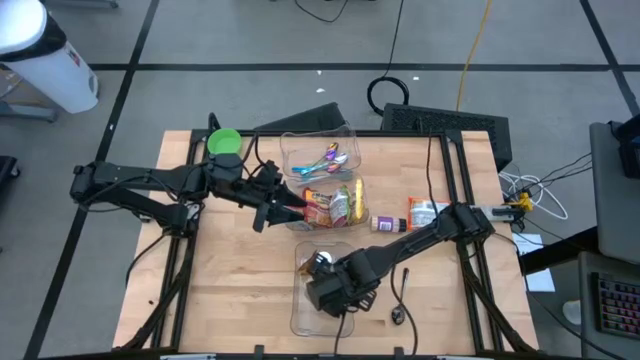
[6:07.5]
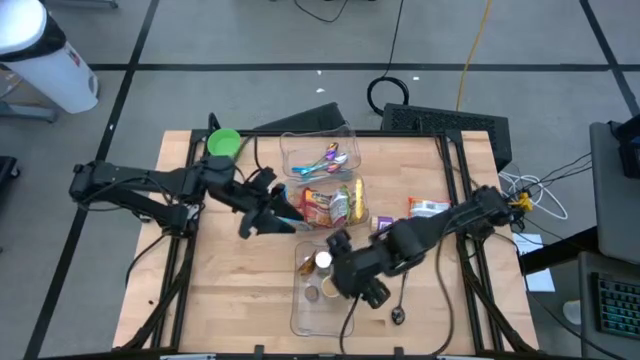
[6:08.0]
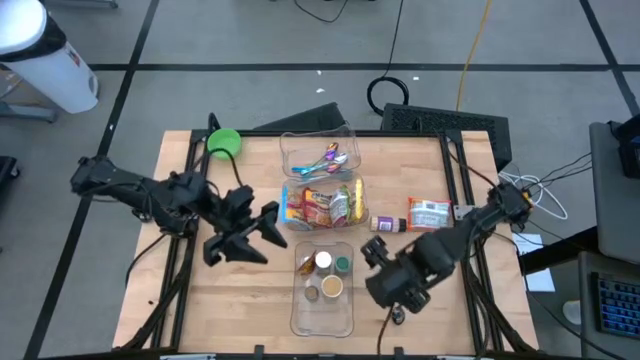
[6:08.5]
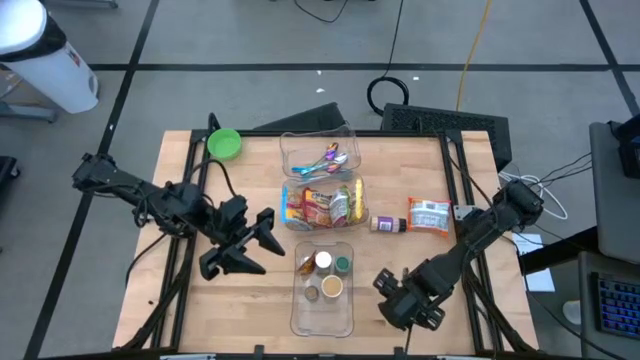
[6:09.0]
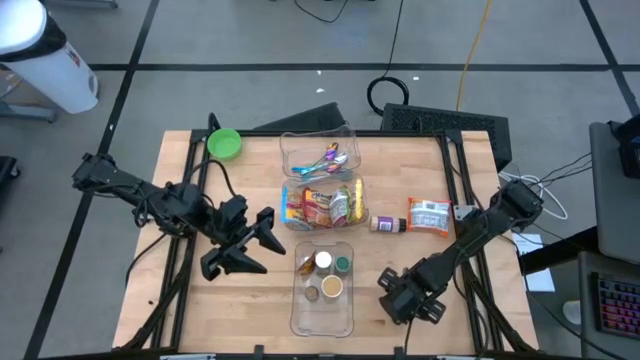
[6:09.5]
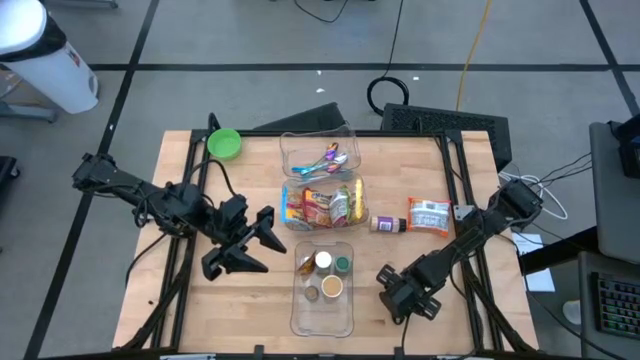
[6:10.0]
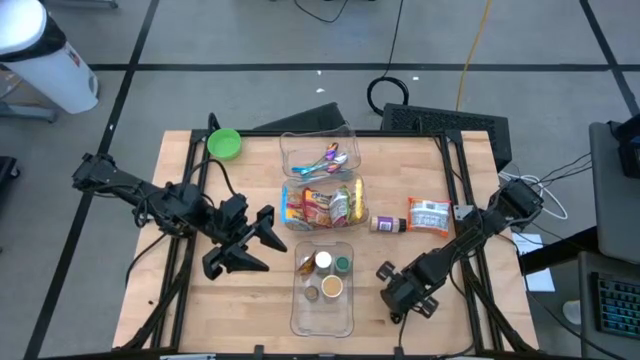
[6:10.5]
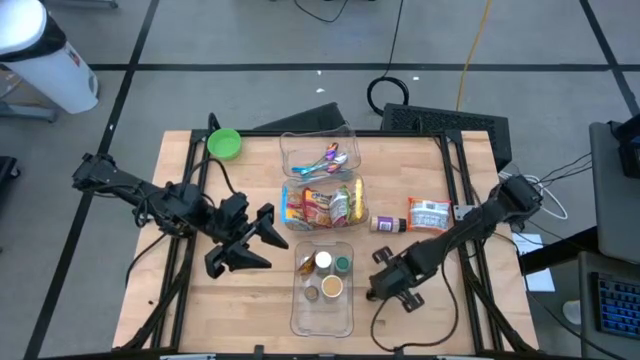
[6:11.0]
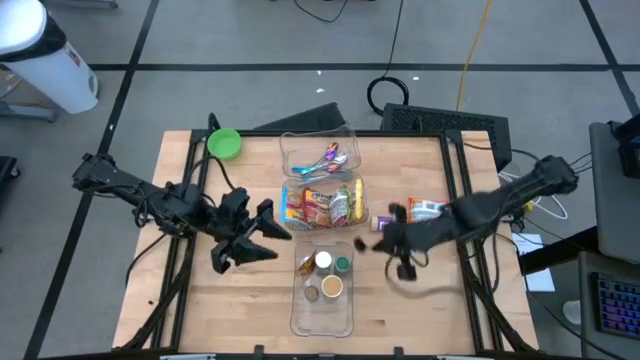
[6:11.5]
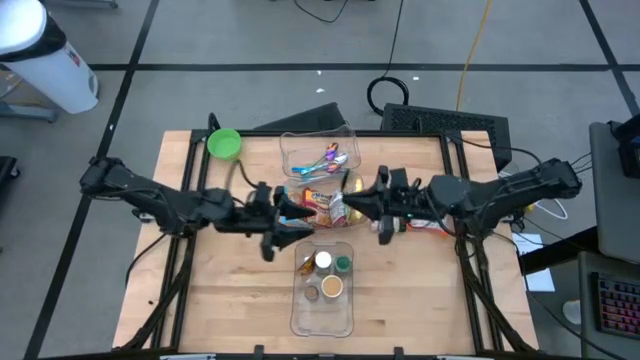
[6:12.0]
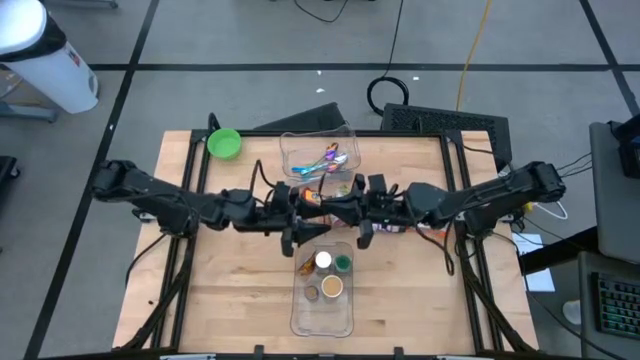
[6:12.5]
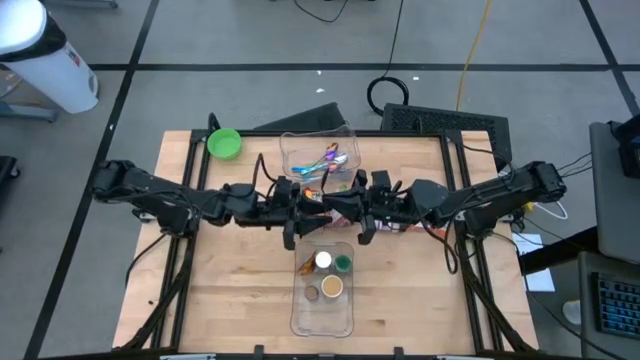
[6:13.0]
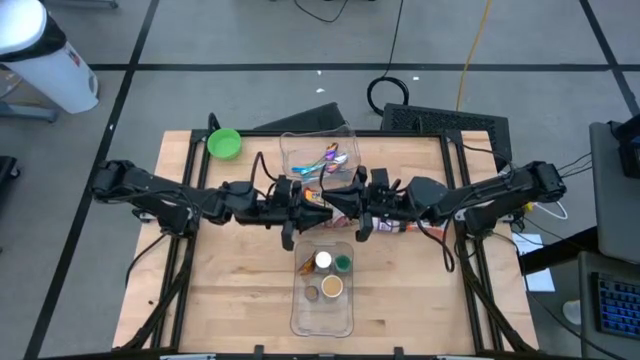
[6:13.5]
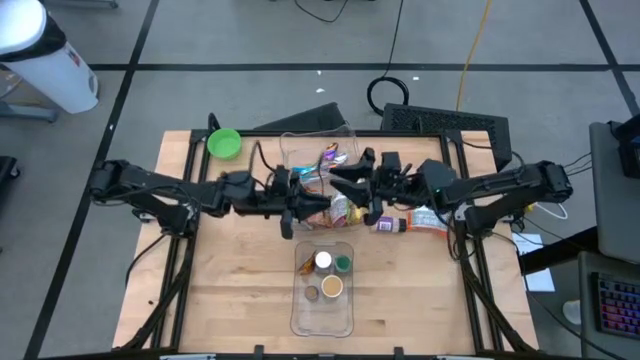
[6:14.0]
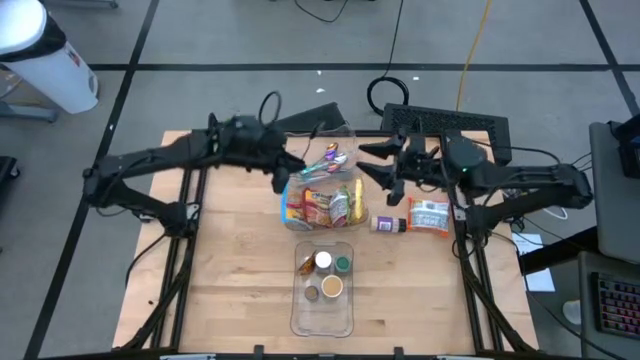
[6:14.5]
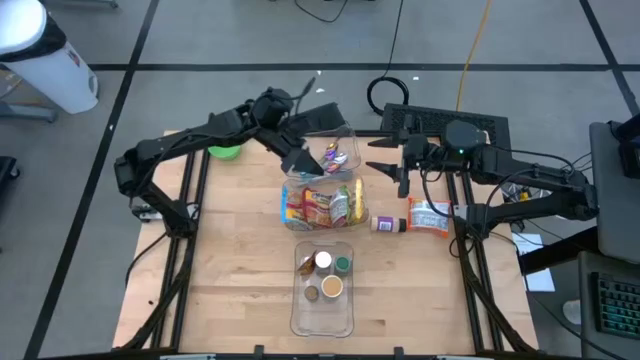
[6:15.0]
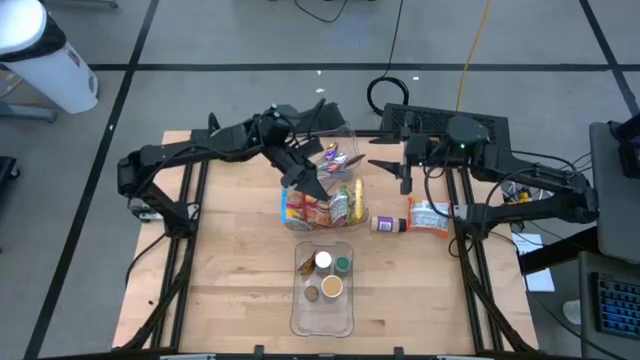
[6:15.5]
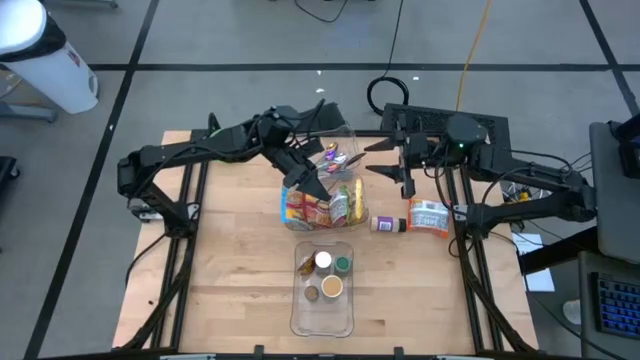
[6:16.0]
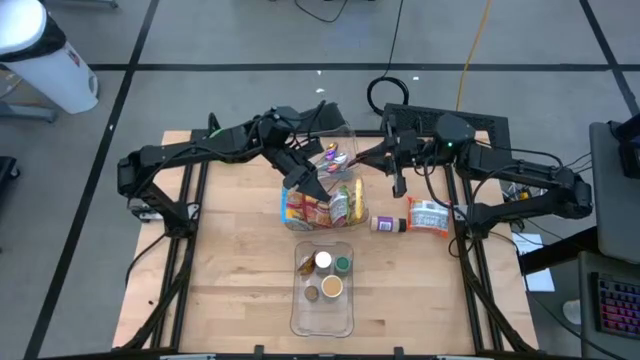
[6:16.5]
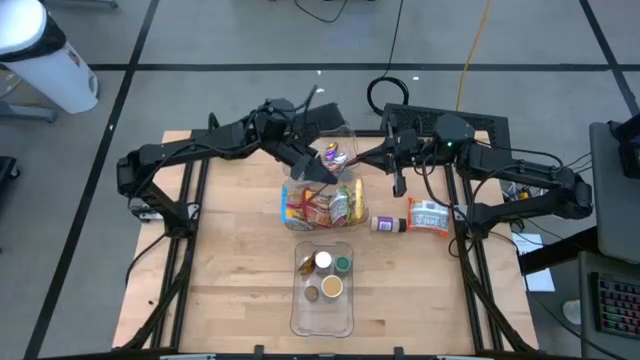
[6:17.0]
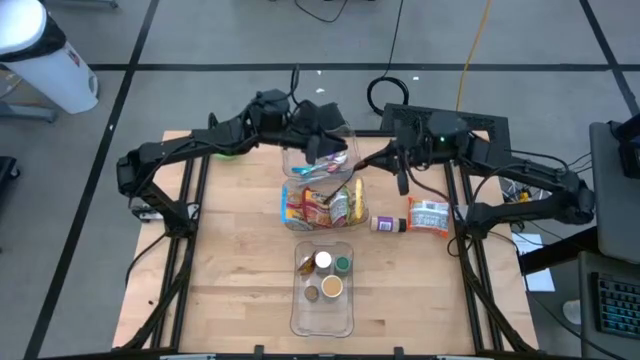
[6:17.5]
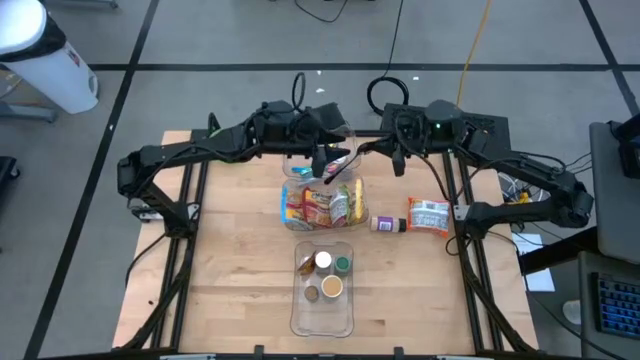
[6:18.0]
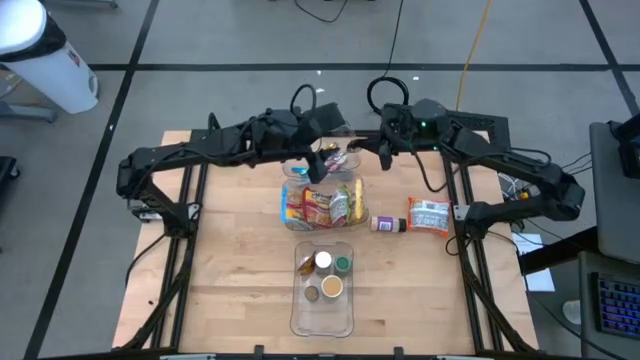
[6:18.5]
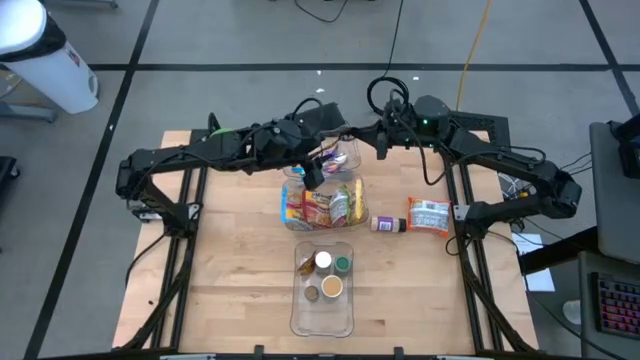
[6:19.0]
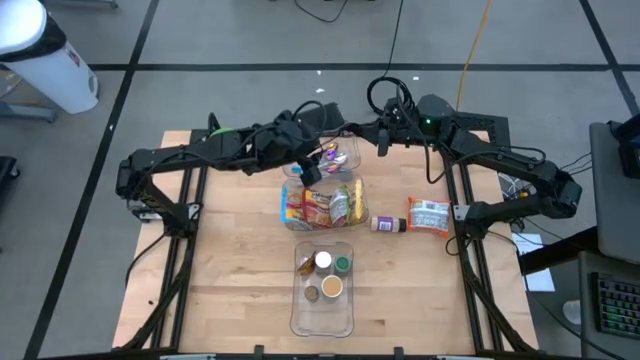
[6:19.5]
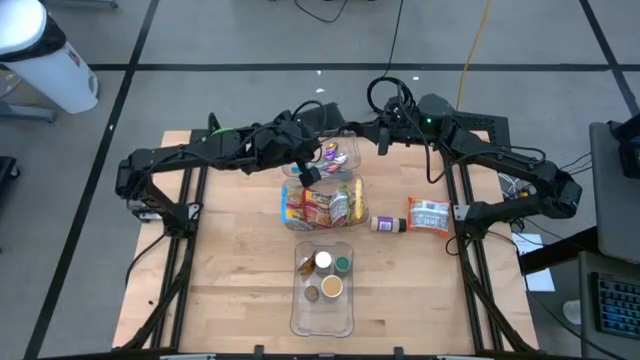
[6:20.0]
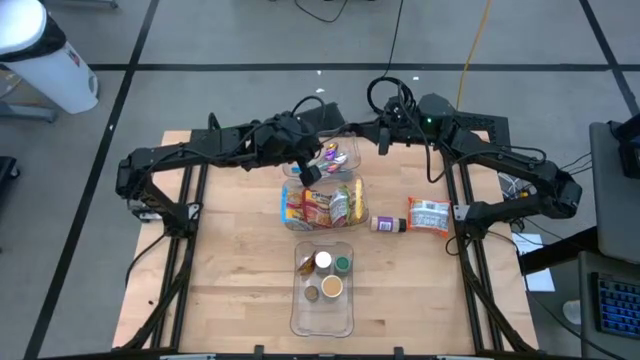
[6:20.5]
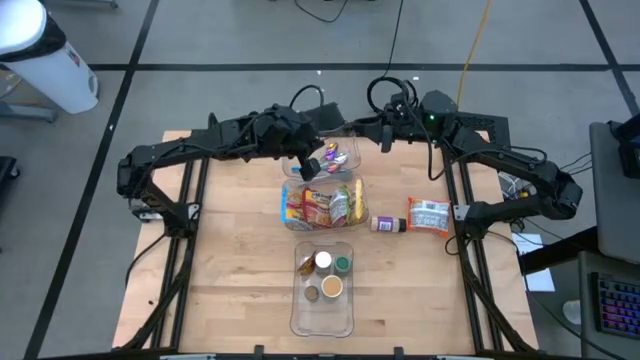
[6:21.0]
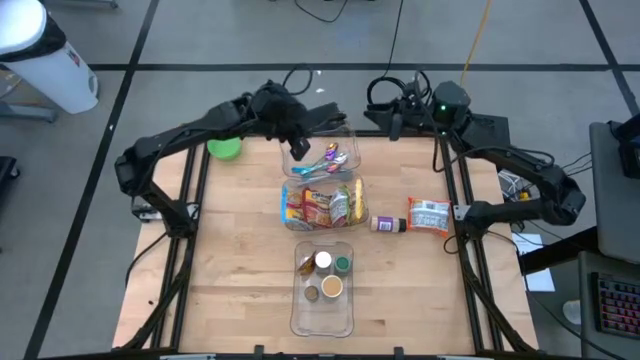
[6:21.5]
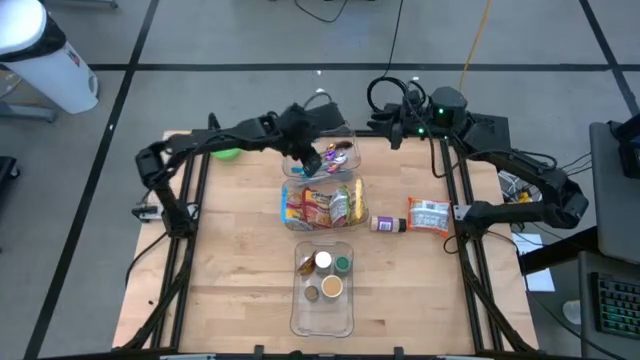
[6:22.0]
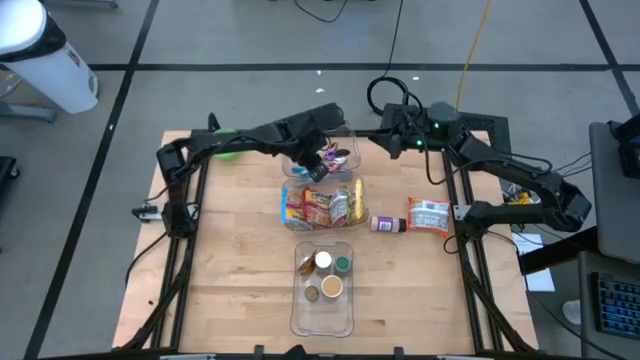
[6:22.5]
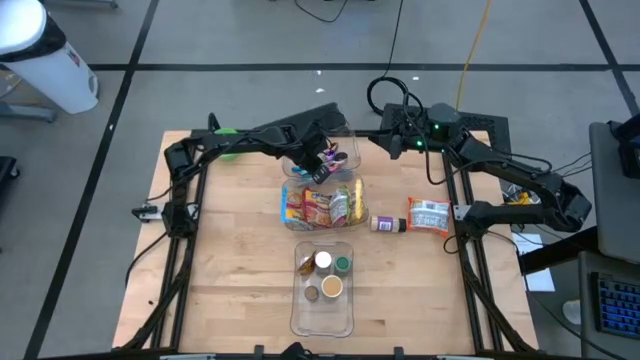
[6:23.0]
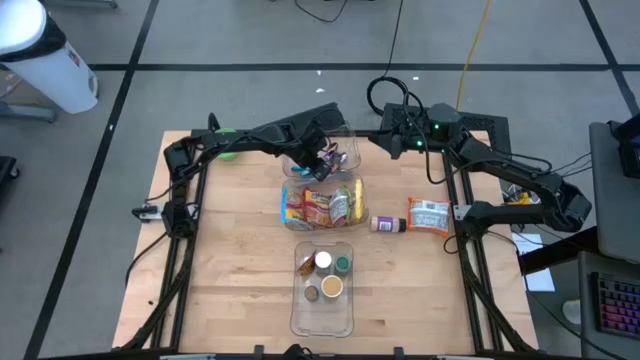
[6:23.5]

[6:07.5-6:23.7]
Task: Pick & Place Food Item
Put the black spoon into the top transparent bin

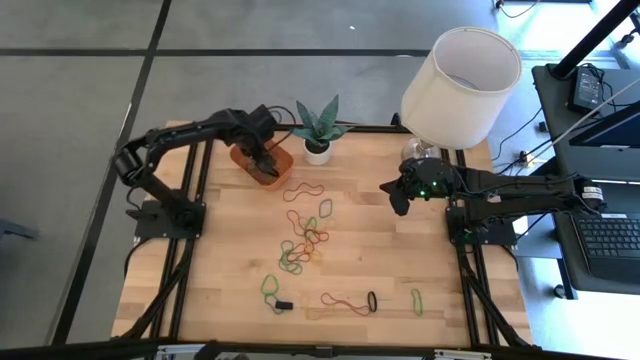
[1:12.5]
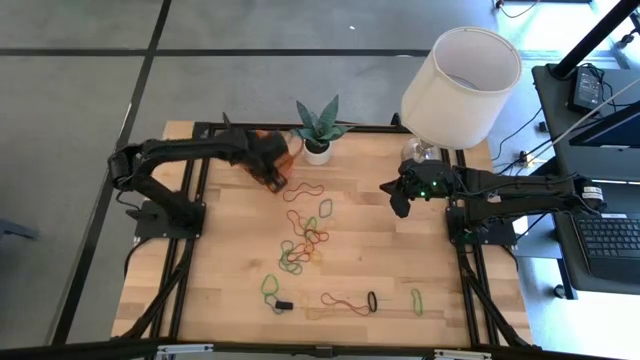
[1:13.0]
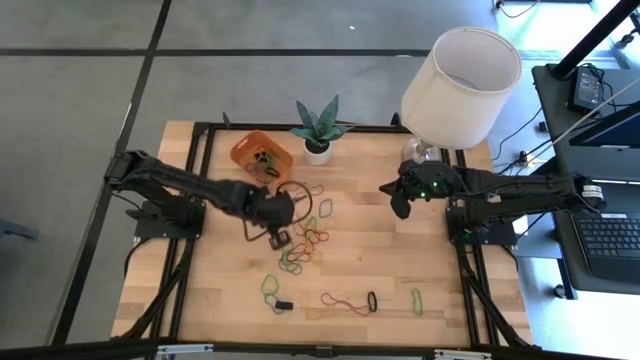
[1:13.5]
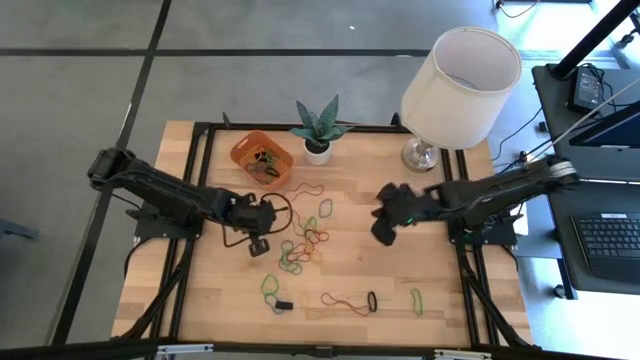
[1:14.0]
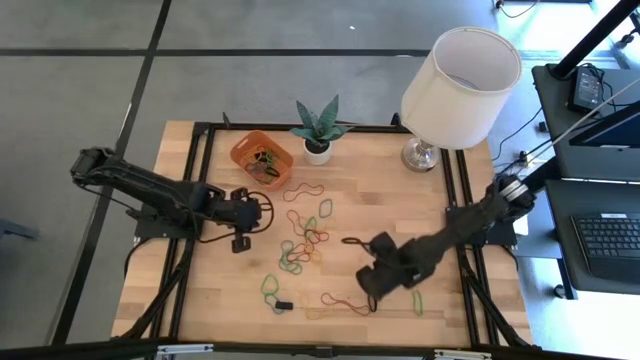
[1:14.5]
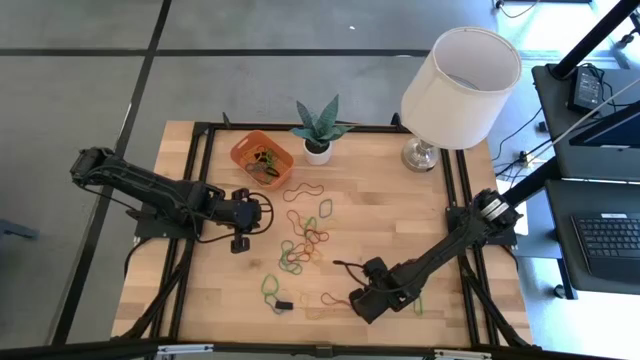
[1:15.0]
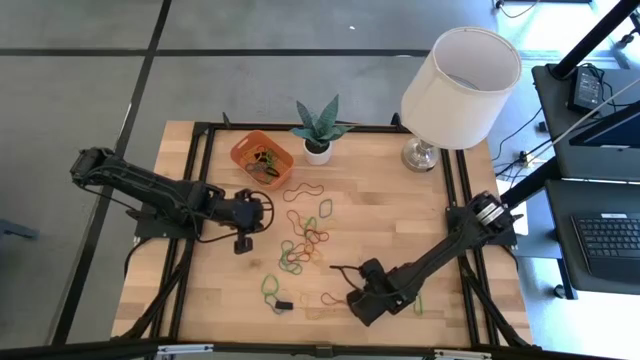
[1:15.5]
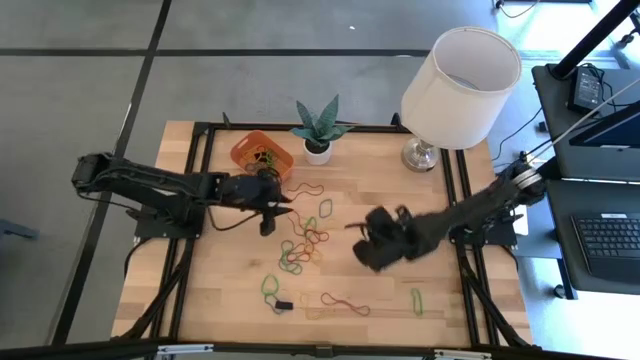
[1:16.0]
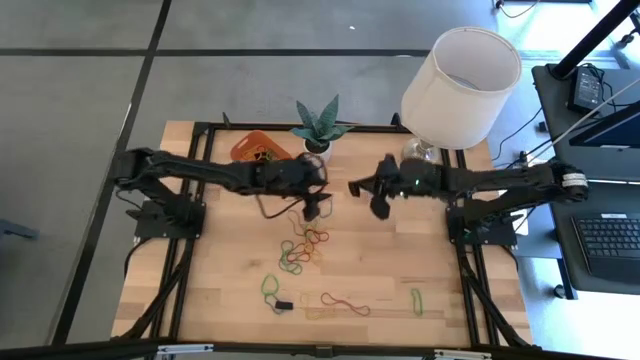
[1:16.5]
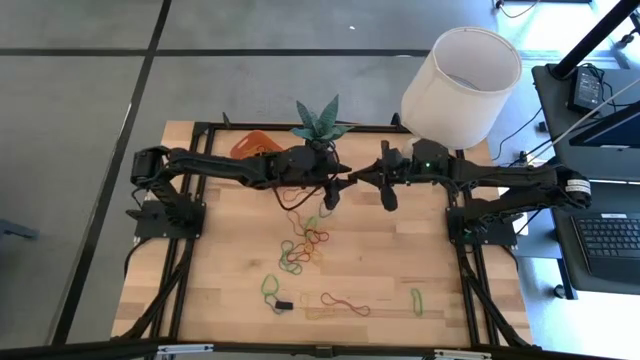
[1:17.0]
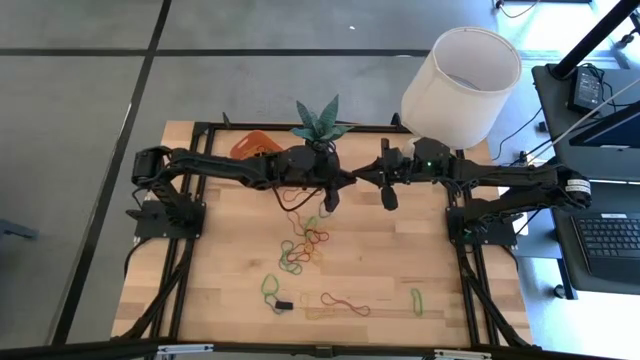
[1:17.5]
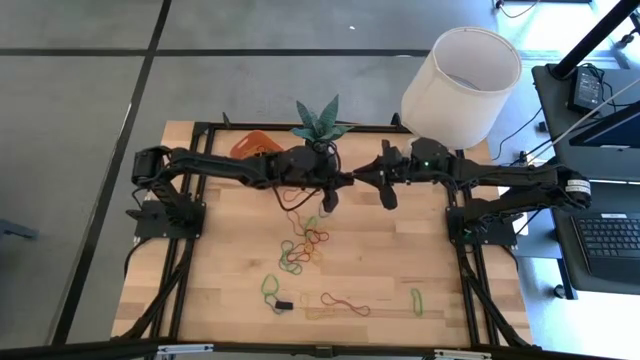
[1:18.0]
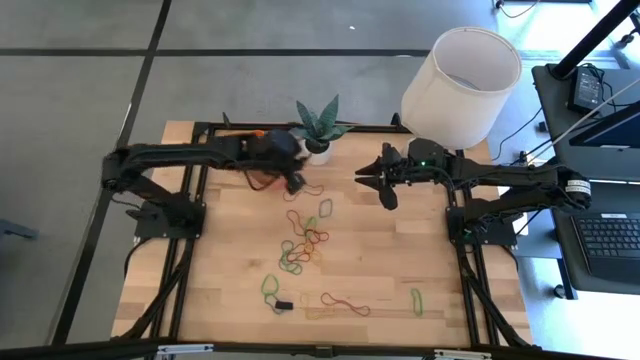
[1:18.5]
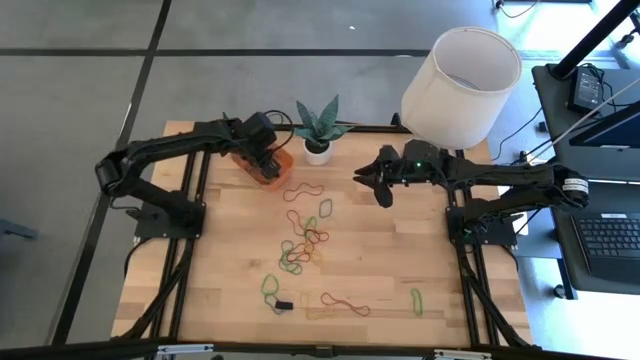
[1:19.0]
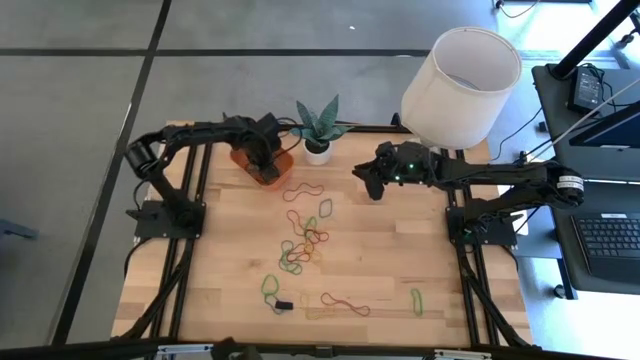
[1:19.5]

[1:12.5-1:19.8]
Task: Pick and place rubber bands into bin
Put the black rubber band into the orange bin
